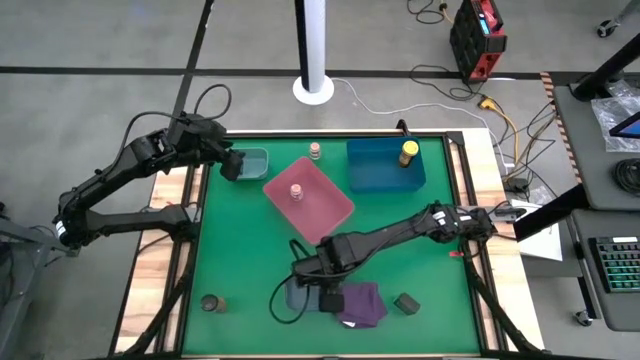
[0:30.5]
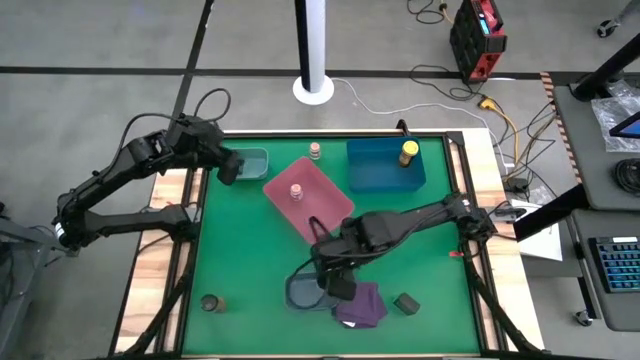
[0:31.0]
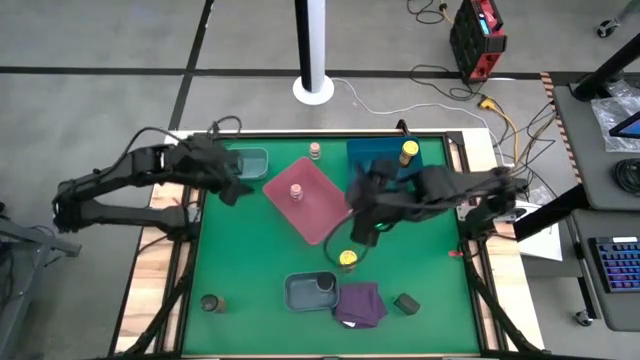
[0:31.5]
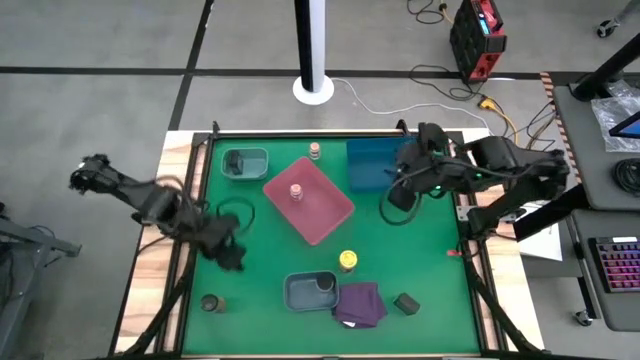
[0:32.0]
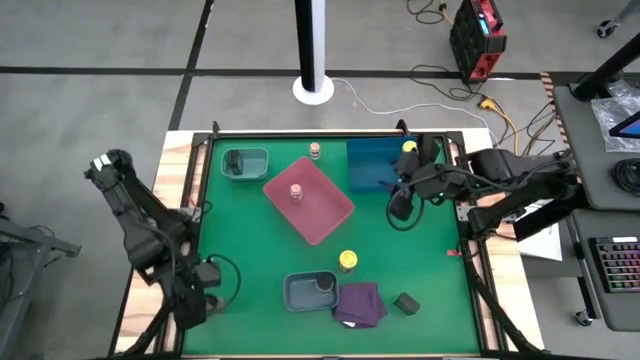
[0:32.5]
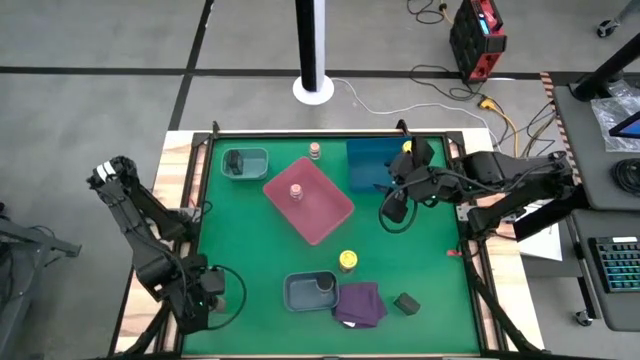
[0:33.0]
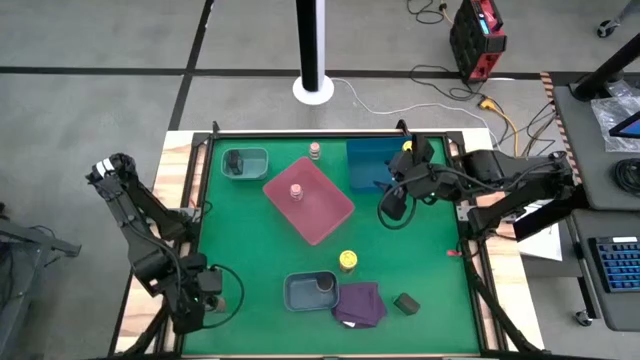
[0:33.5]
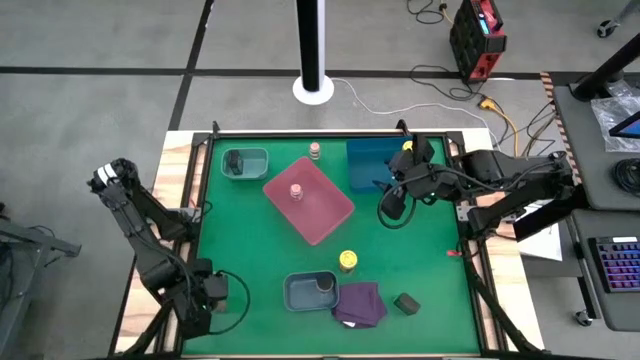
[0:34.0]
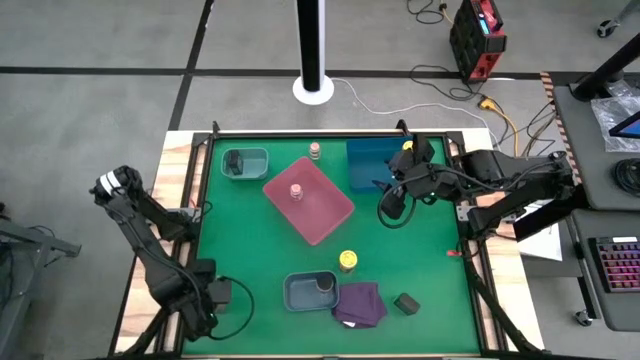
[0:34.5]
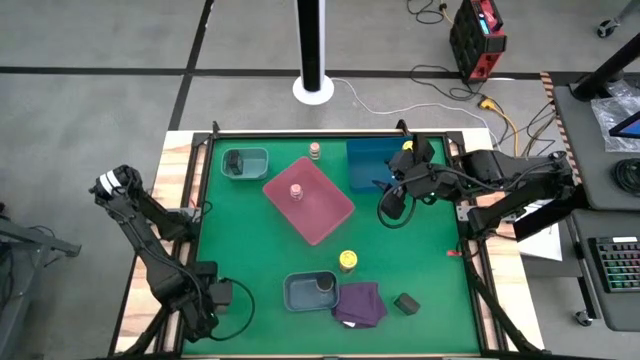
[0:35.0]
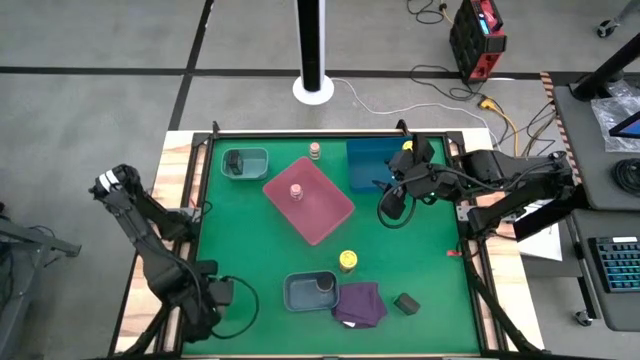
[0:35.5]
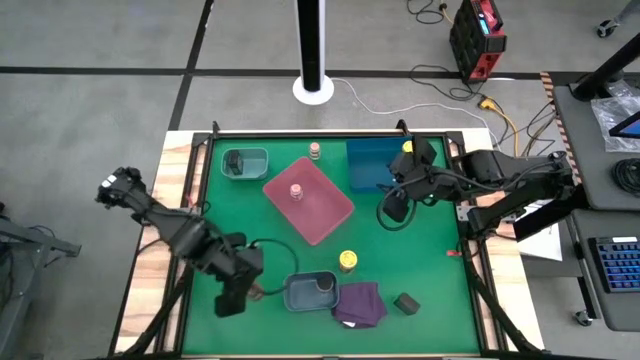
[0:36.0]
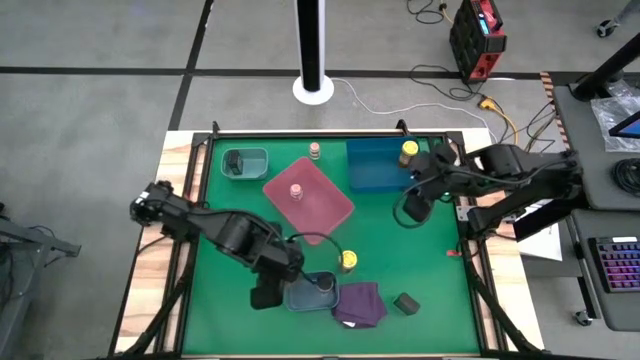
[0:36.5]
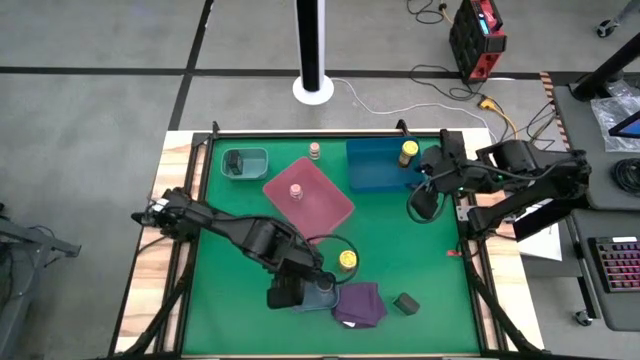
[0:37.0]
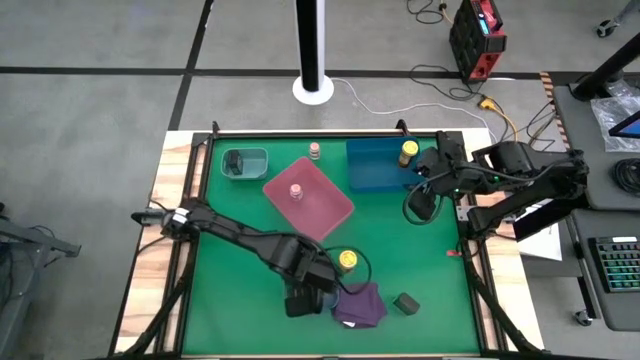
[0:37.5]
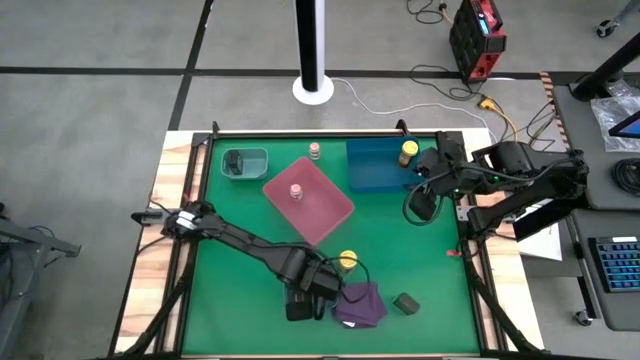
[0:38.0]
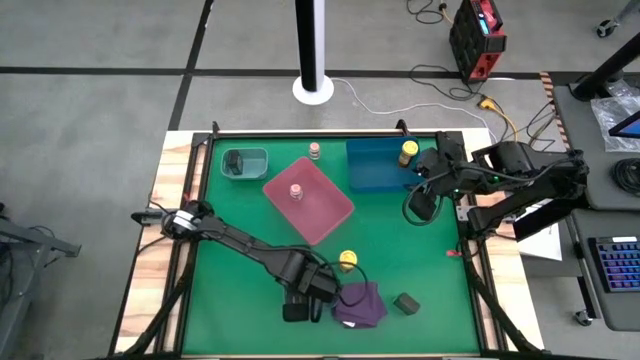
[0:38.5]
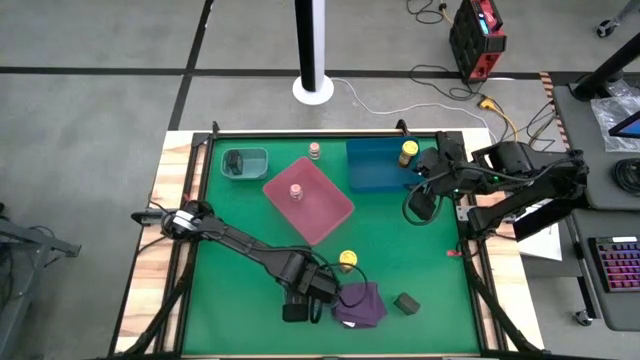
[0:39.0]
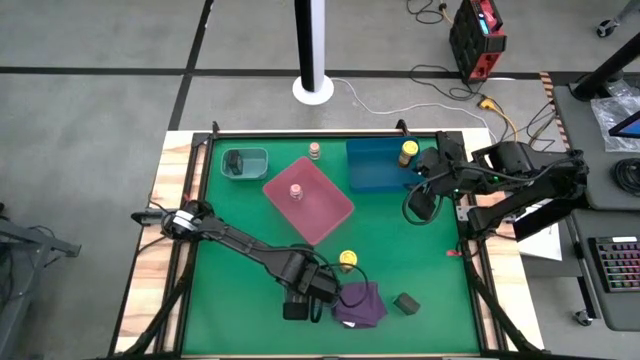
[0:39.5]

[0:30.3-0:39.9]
Task: Sort spices by type
Put the orange seasoning bottle into the gray bin

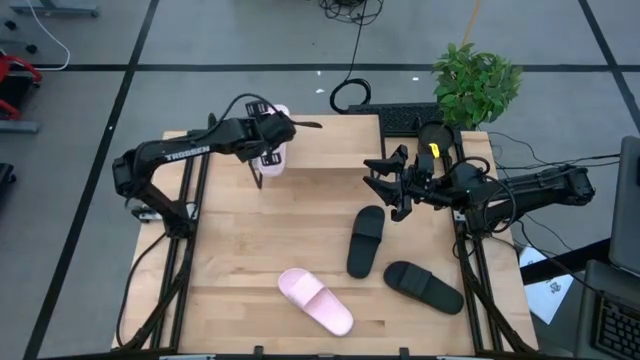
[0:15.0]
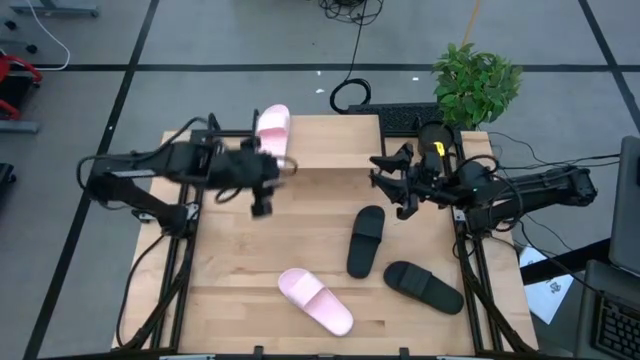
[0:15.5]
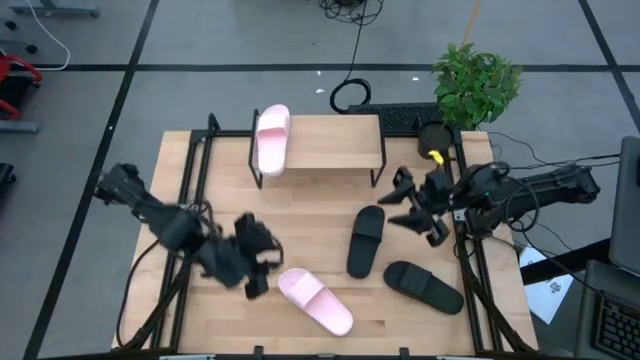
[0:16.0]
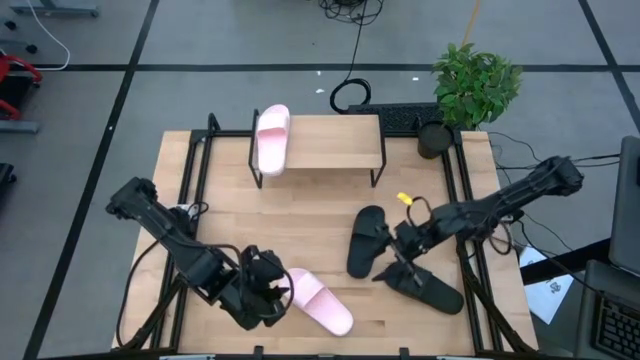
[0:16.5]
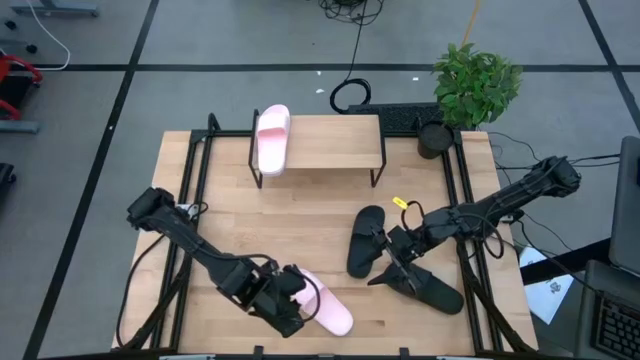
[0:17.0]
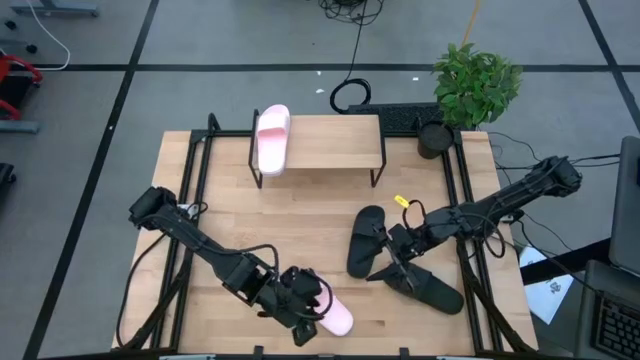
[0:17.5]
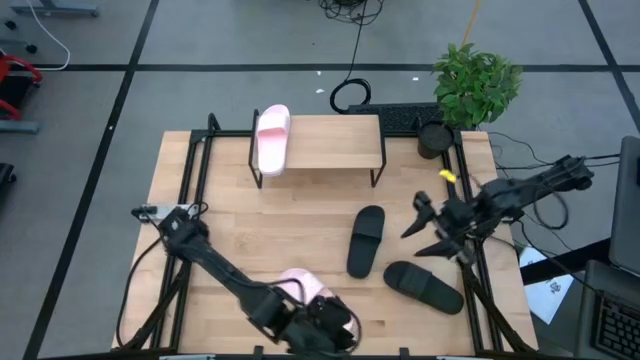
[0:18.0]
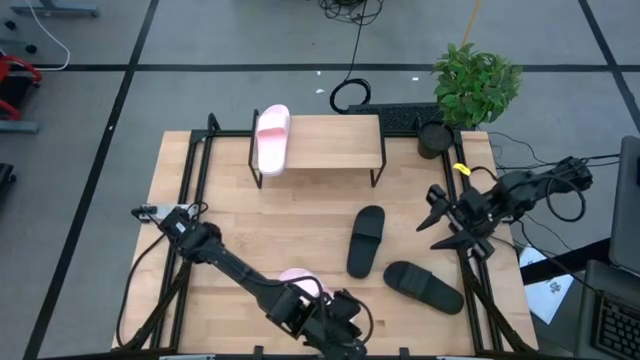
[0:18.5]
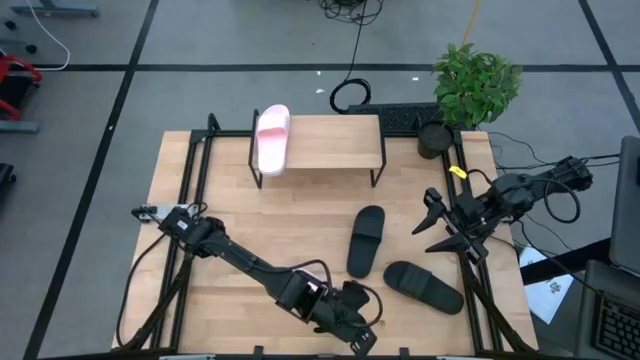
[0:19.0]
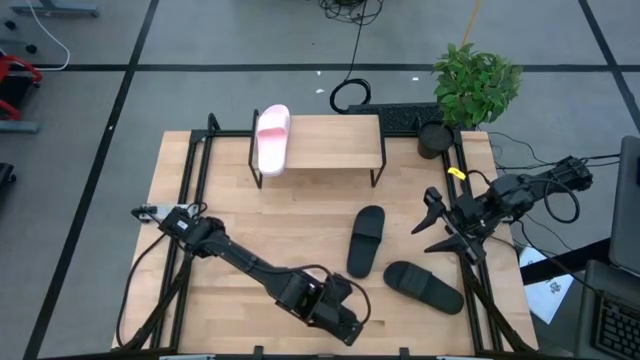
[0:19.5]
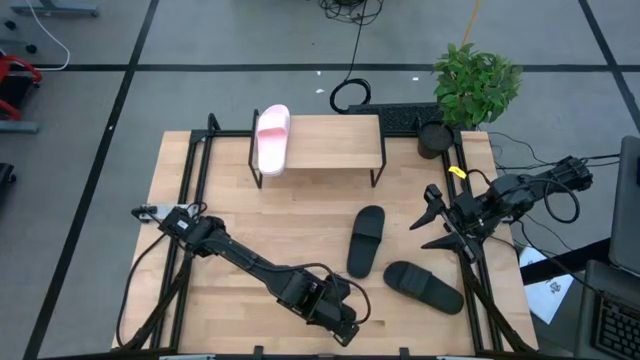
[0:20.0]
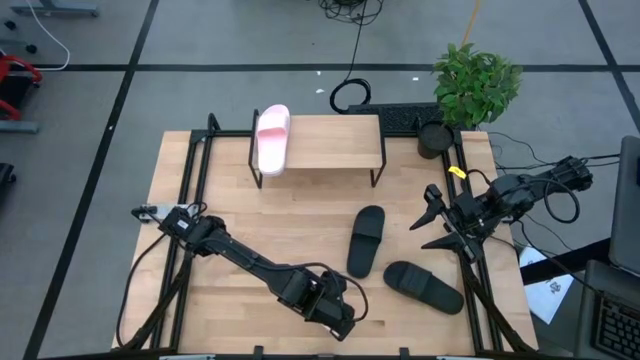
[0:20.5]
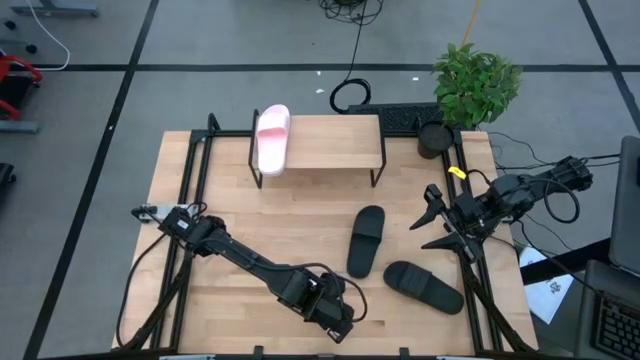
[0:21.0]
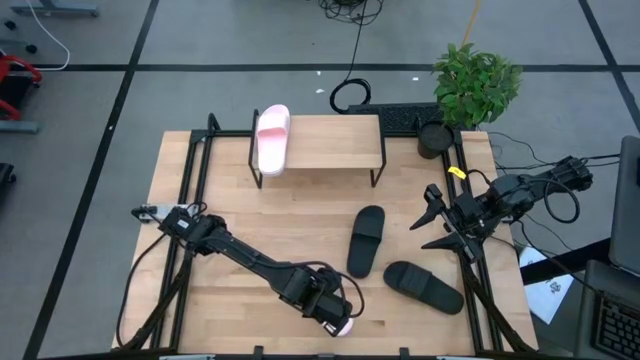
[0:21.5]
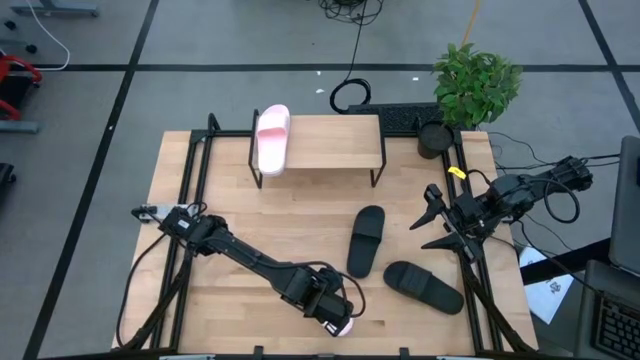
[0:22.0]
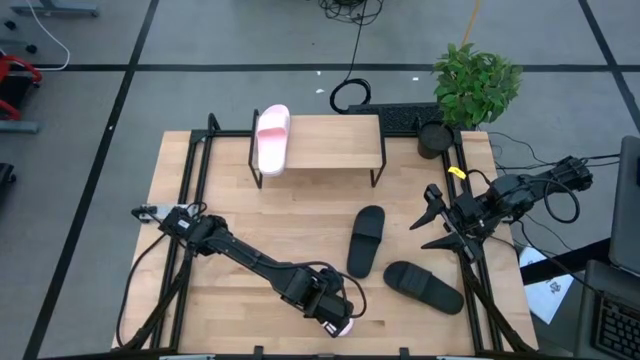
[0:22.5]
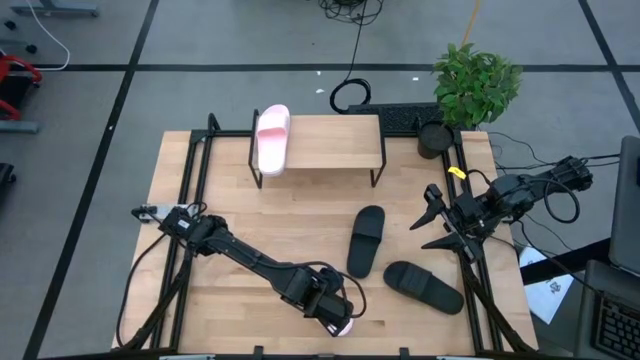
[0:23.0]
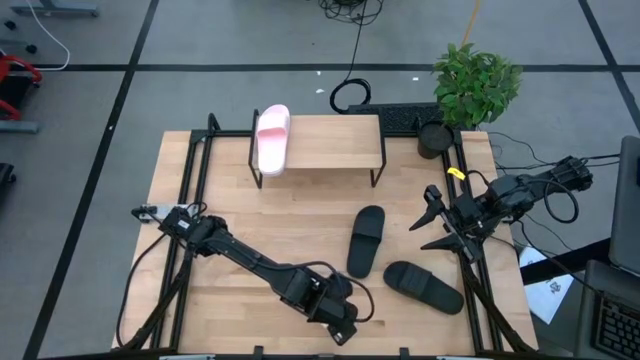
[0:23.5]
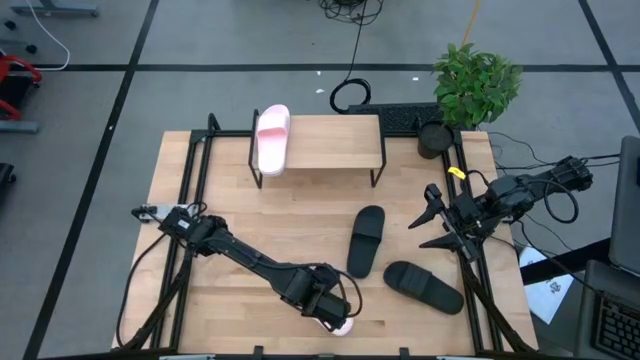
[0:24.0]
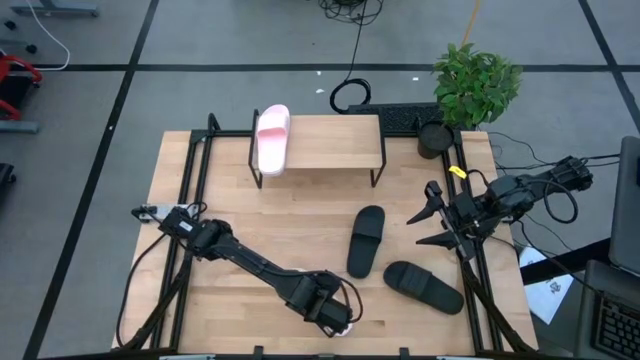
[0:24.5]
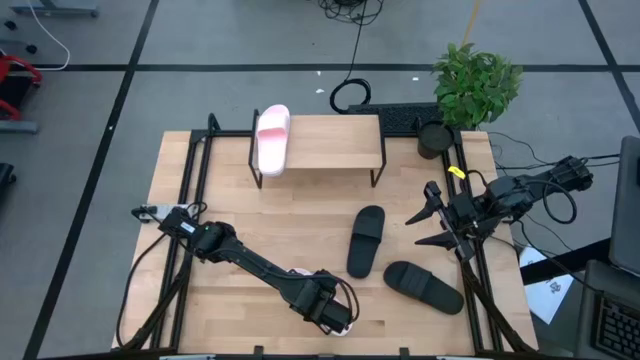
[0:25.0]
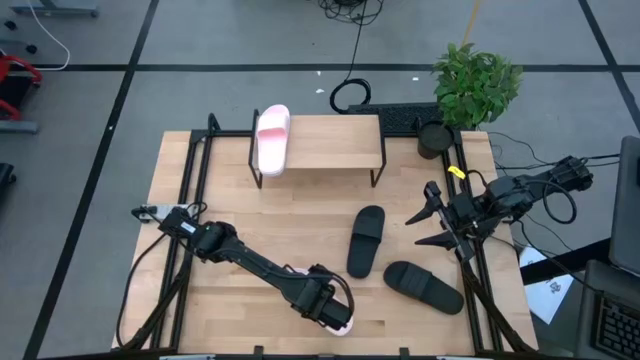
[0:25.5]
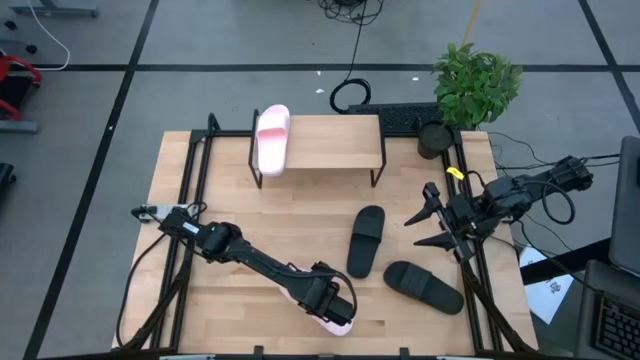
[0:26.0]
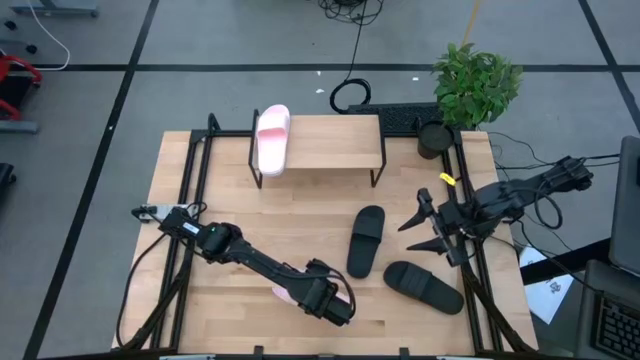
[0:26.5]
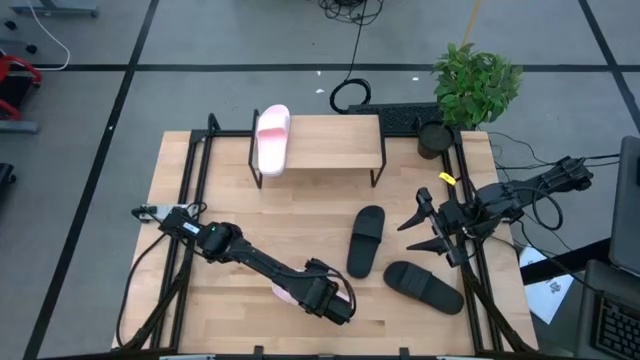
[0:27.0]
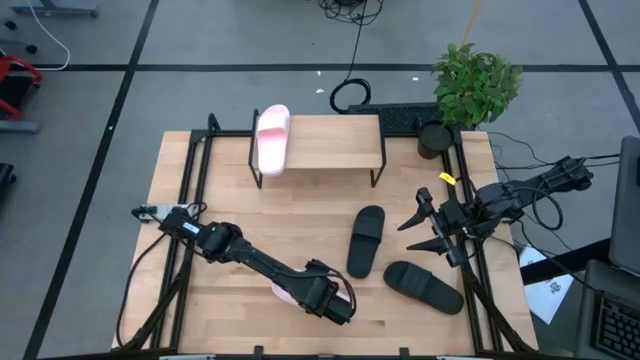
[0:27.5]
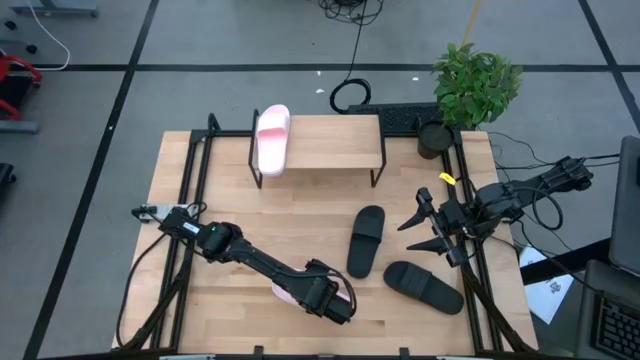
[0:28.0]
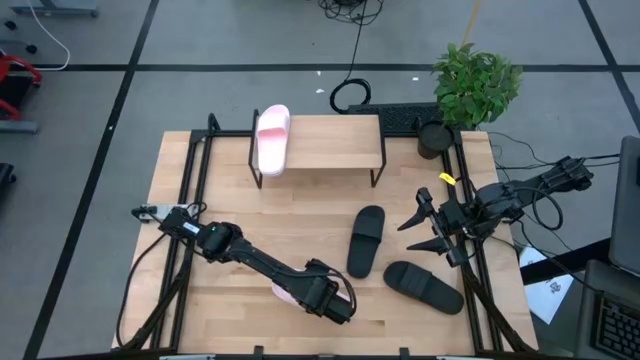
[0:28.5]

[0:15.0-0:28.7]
Task: Pick and place slides into the shelf
Put the pink slide on the shelf
